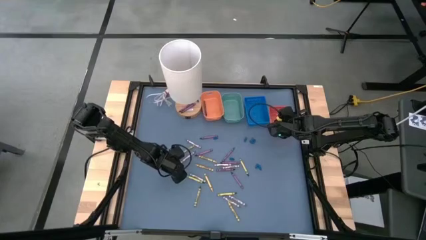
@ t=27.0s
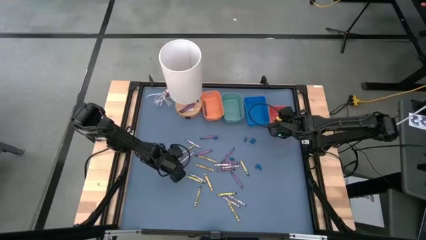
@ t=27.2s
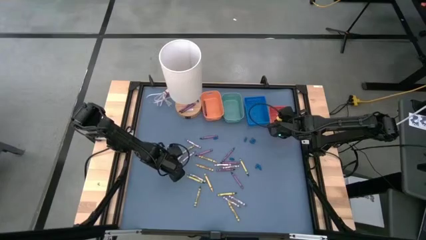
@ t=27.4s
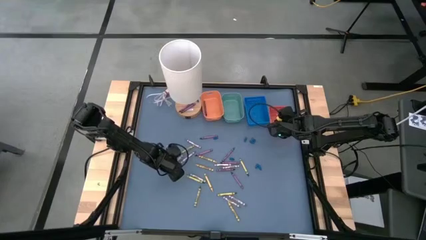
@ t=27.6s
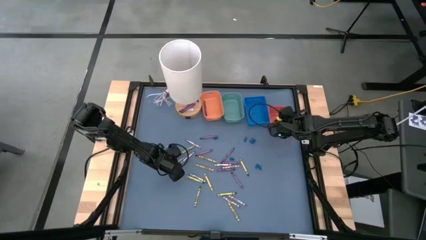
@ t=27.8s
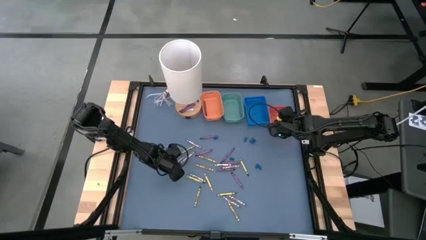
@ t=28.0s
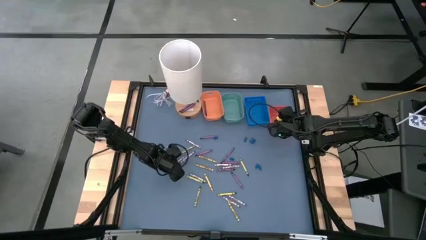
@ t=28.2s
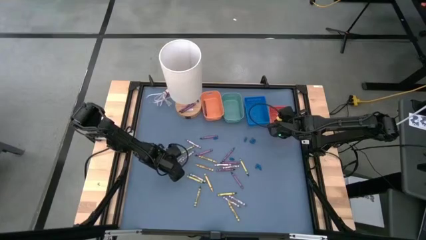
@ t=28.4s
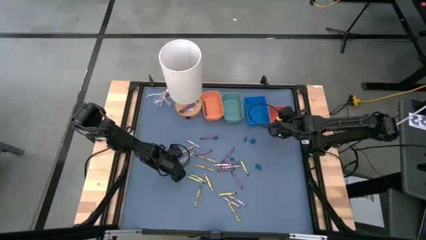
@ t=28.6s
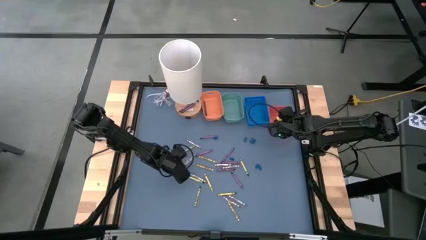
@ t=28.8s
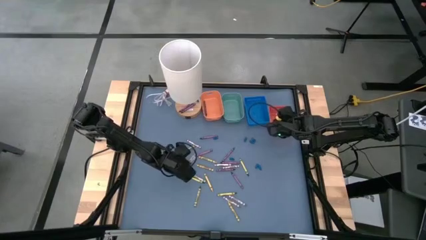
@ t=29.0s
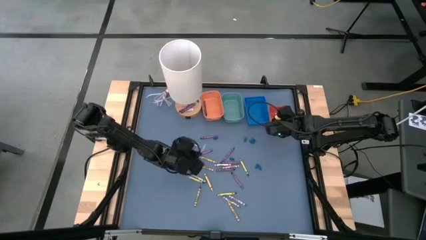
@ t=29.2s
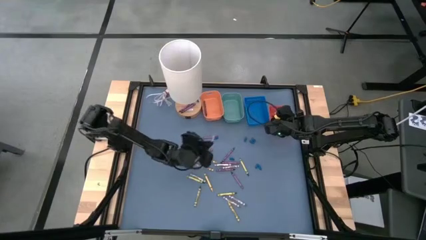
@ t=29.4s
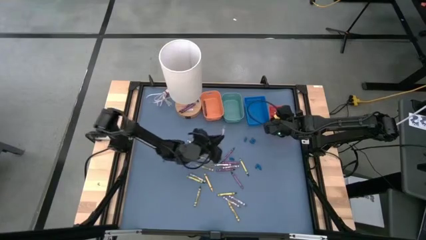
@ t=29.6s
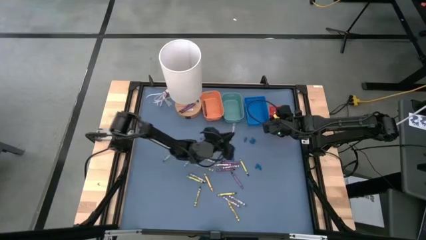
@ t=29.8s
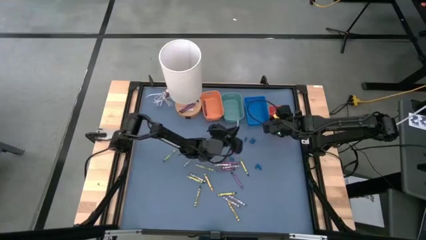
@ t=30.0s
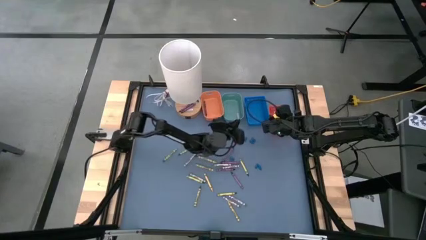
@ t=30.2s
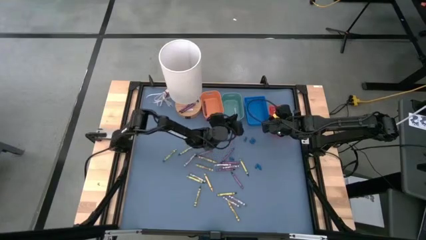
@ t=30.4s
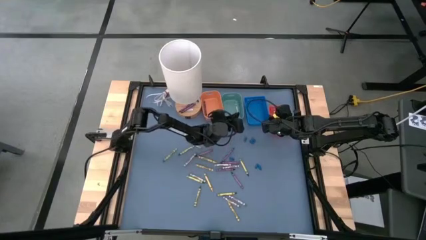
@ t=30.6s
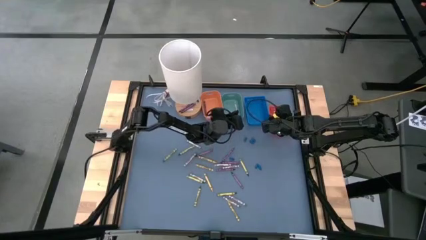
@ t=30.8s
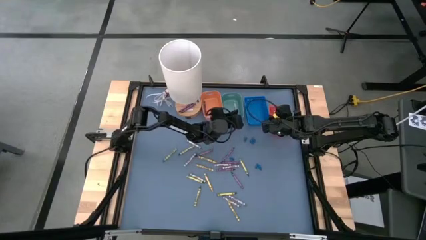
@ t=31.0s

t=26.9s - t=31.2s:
Task: Sort crayons
Put the gray crayon into the green bin

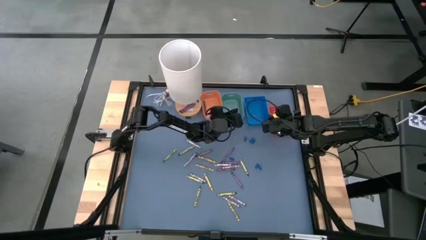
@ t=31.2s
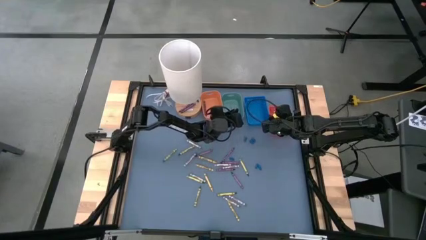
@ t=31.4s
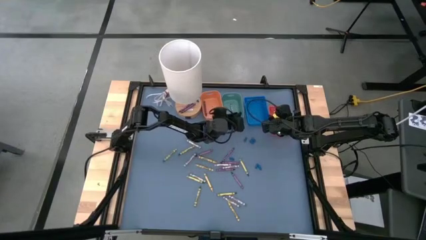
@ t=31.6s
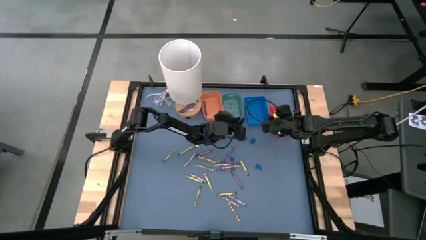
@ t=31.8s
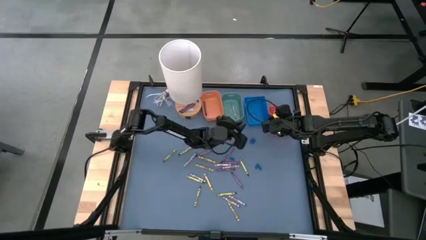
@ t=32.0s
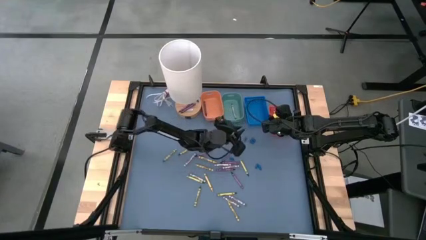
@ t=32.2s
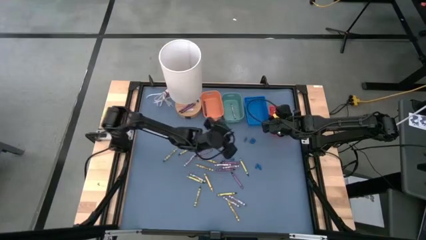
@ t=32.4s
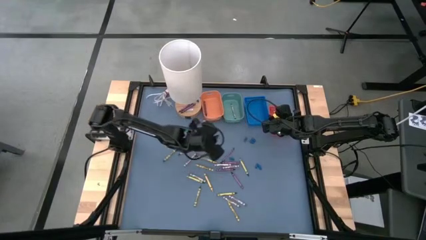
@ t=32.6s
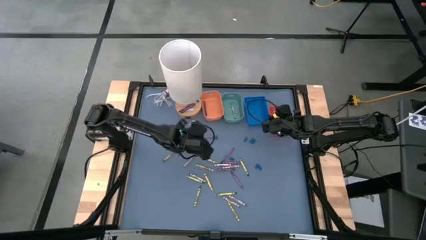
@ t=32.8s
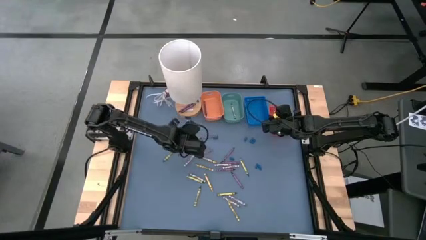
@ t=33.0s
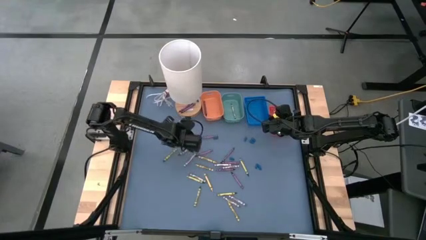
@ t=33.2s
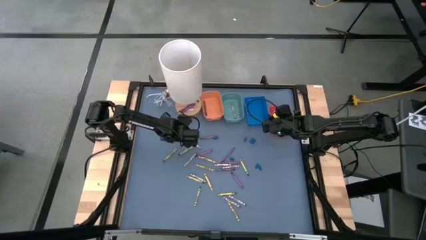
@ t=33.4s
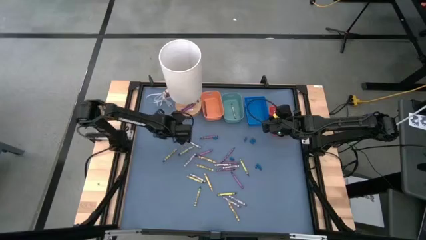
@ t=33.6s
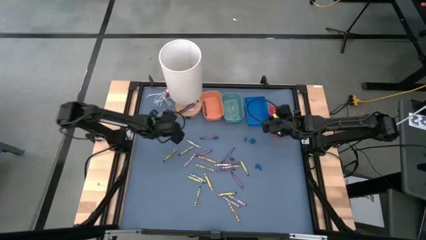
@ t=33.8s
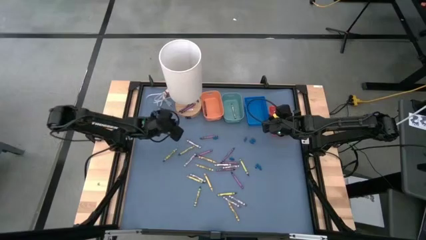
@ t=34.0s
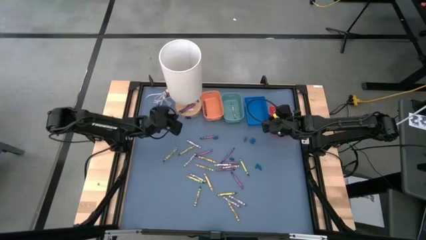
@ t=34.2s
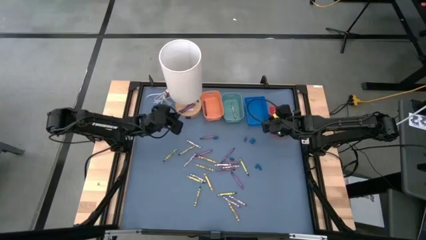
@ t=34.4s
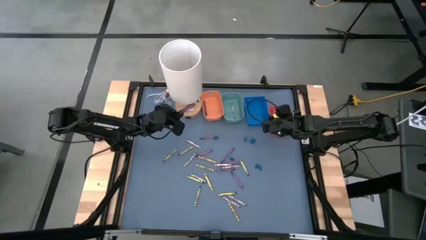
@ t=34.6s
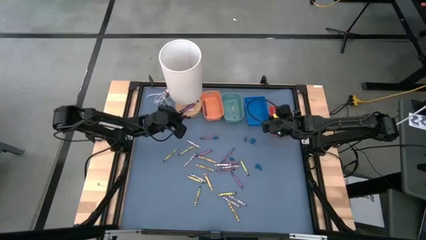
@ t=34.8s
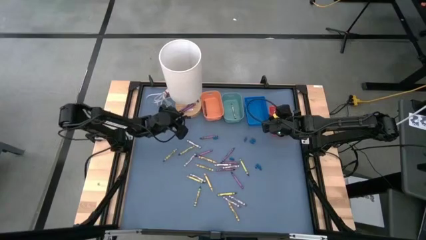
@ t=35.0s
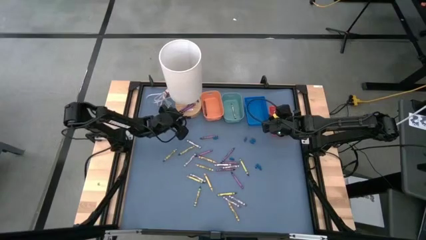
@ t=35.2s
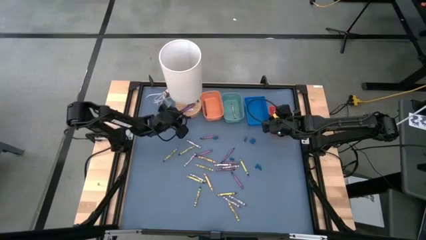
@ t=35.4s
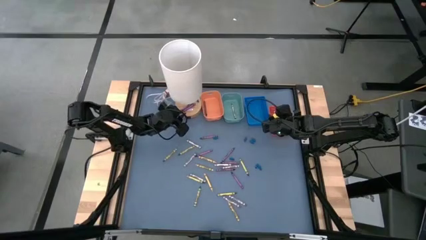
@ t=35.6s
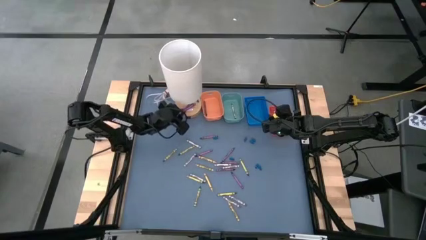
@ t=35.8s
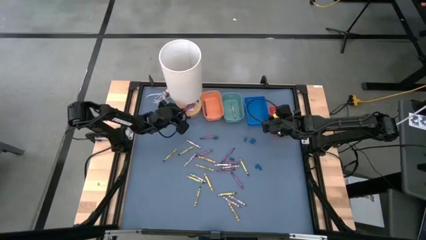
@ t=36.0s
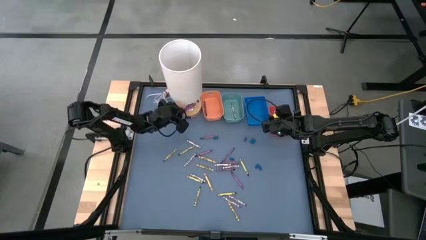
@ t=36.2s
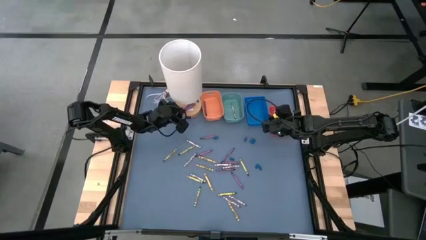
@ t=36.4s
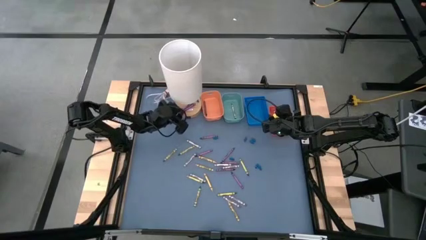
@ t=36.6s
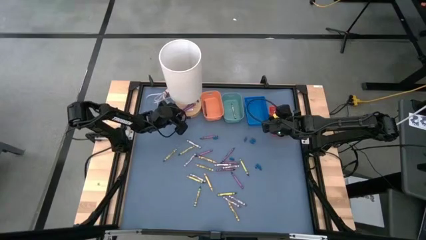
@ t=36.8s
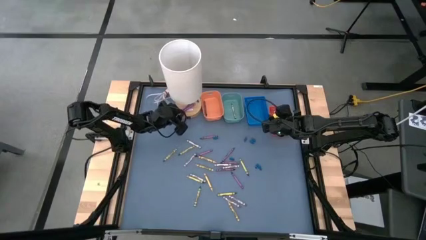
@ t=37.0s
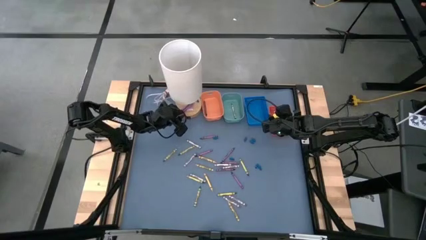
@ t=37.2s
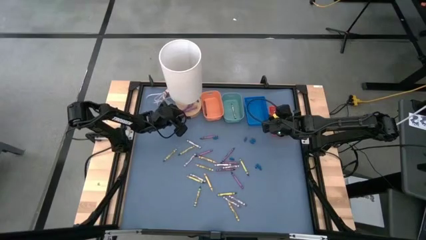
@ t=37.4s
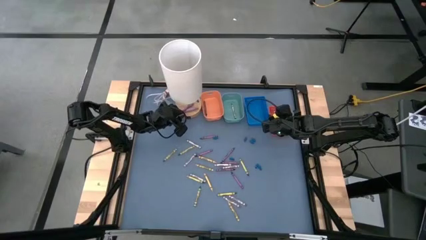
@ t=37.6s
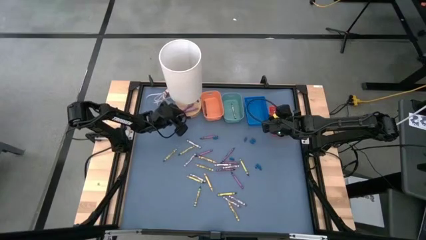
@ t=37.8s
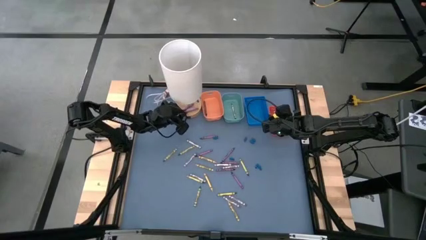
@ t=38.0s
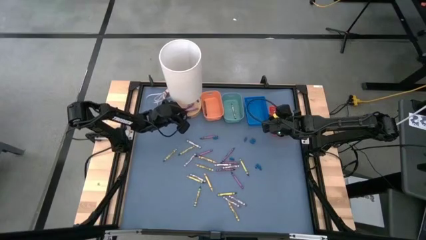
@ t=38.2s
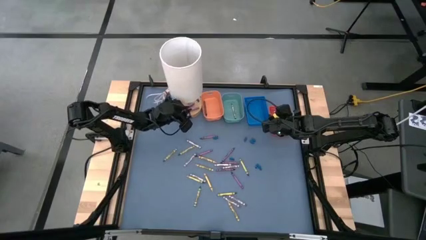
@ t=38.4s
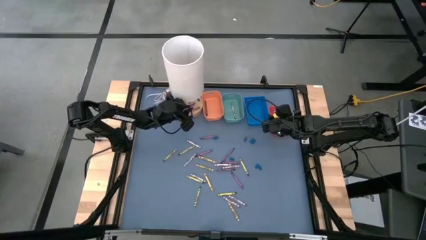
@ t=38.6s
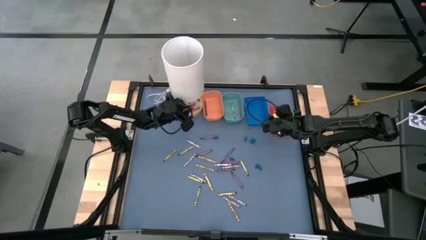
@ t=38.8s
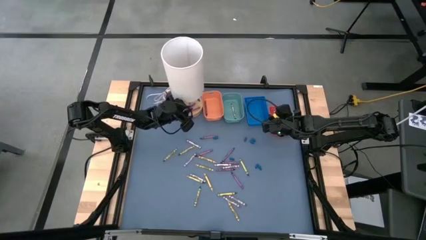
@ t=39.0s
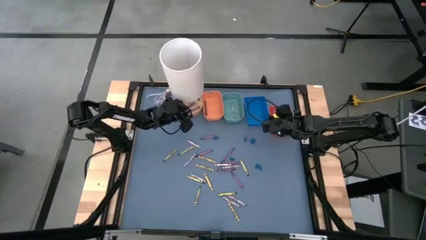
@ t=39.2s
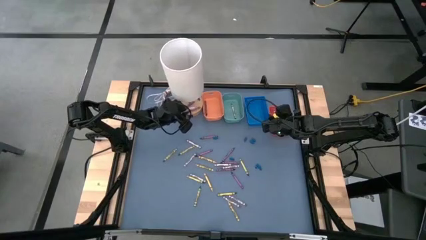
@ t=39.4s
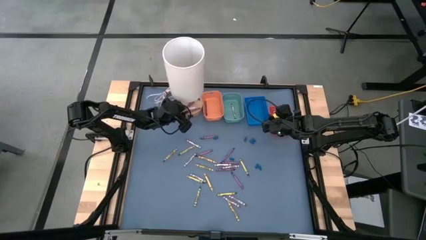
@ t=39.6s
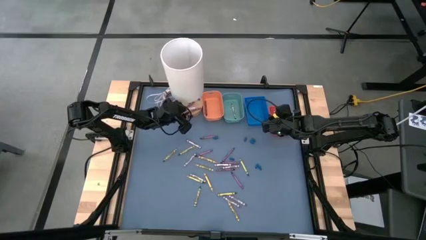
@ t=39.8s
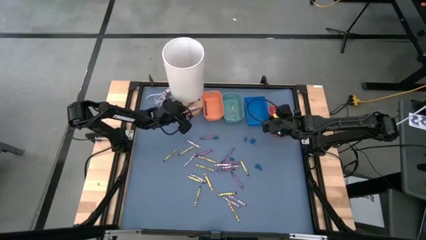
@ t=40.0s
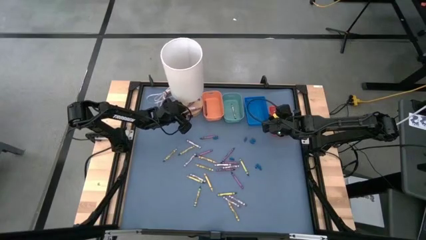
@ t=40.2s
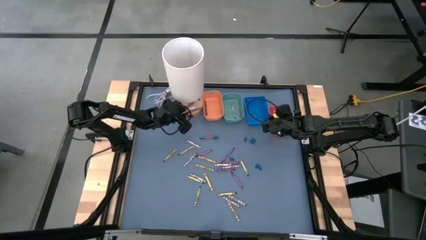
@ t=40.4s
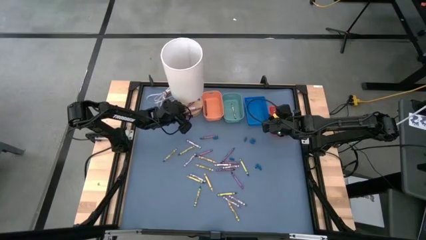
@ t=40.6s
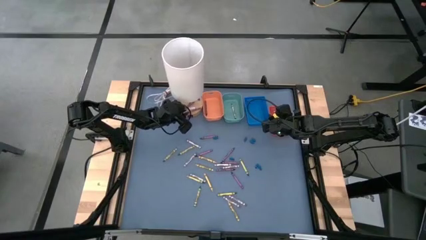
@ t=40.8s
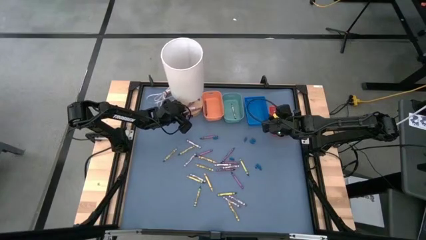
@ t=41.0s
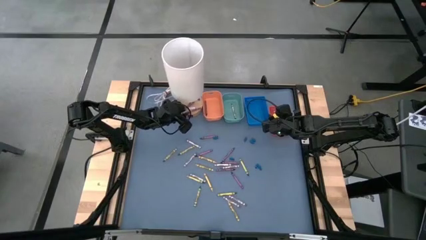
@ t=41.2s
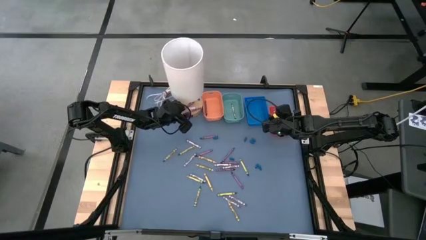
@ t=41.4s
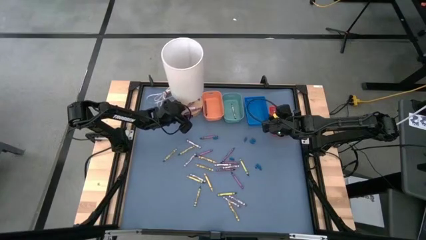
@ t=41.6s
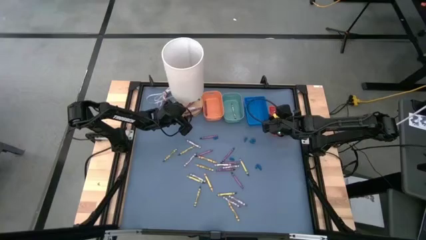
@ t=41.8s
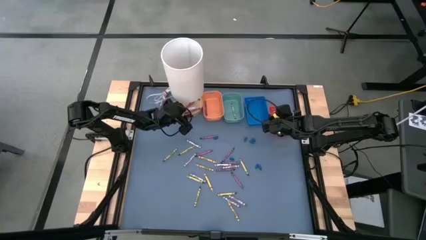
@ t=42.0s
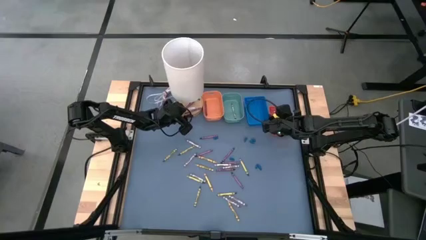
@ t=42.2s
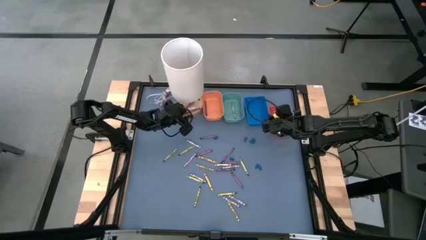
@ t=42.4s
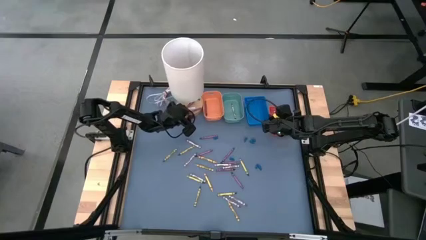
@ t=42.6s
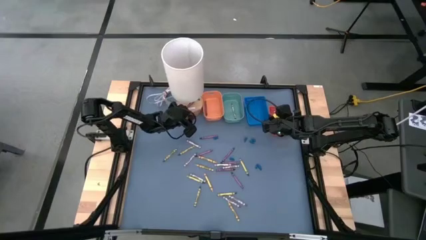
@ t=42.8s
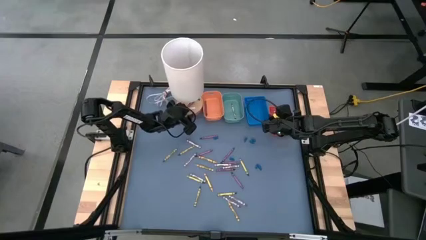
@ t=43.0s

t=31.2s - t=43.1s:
Put the purple crayon into the light orange bin

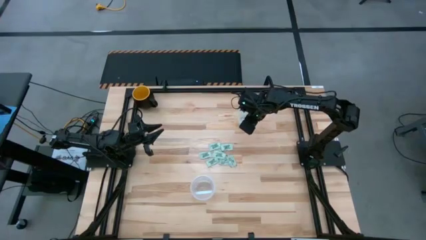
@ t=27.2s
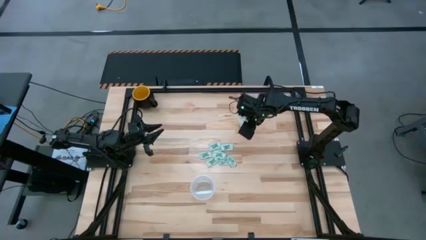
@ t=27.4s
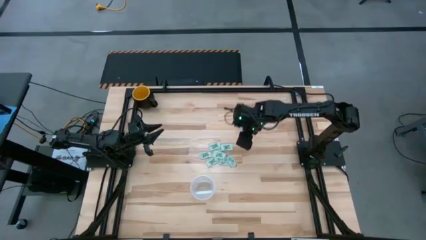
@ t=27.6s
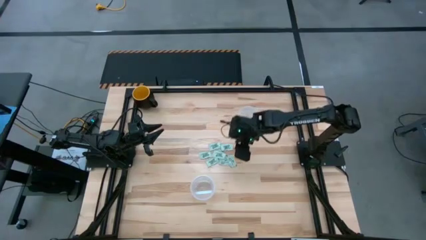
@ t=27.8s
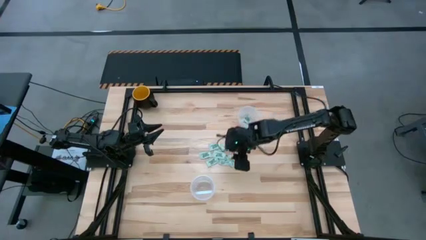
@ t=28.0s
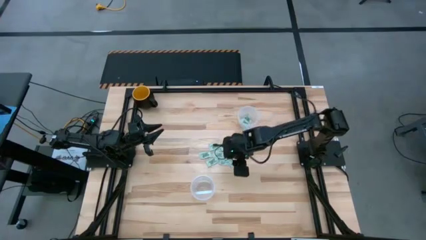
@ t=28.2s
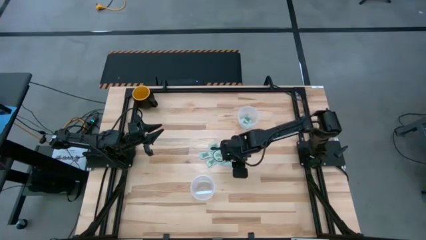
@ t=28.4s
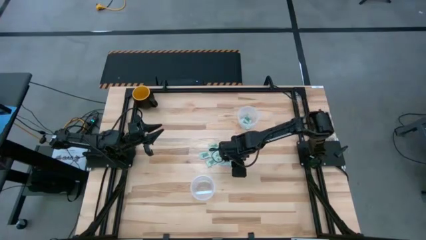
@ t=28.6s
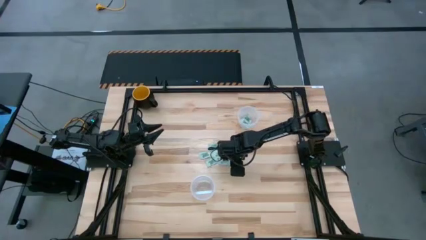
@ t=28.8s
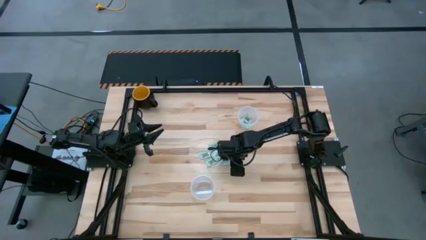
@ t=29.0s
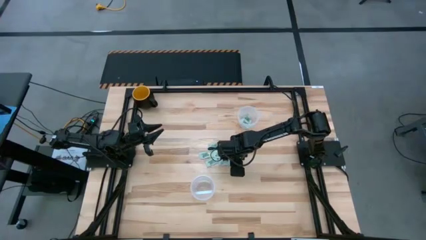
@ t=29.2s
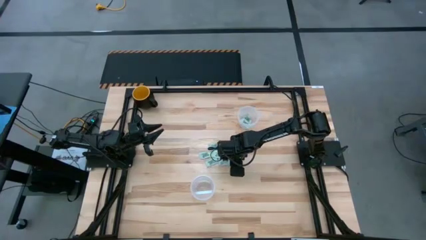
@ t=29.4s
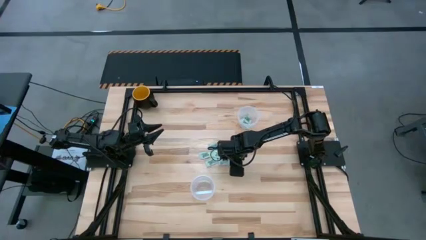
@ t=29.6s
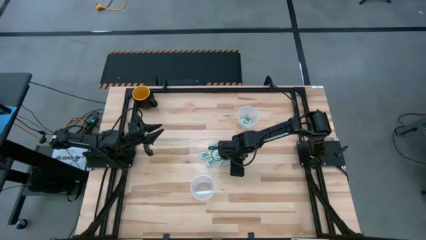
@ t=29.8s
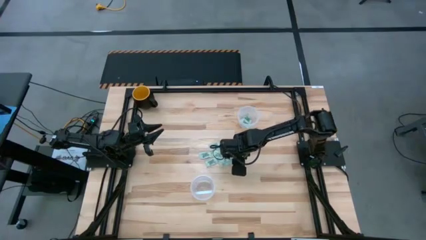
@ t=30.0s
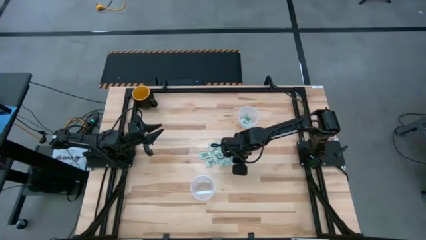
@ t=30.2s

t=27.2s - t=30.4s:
Task: Pick and place Stevia / Truvia into bins
Put the stevia packet into the top transparent container
